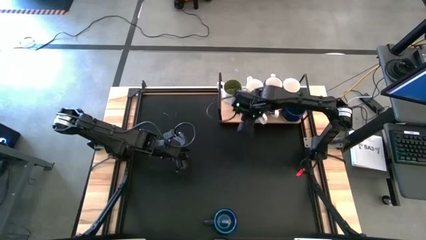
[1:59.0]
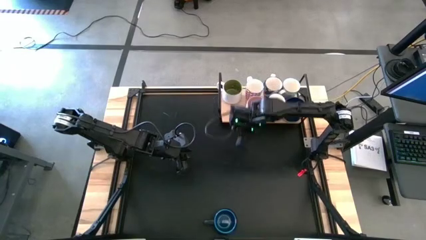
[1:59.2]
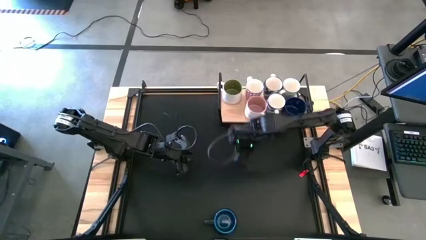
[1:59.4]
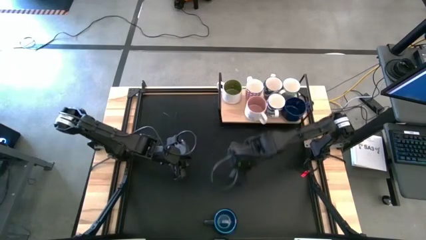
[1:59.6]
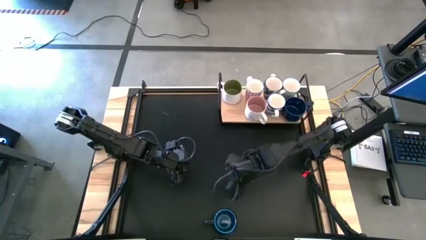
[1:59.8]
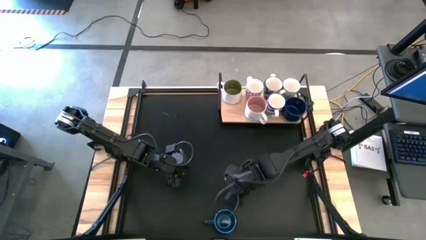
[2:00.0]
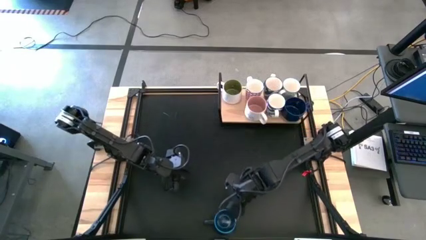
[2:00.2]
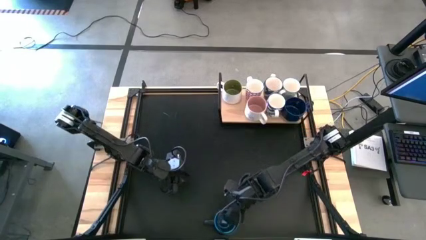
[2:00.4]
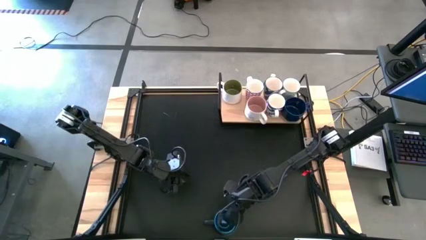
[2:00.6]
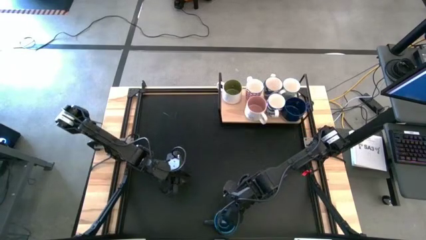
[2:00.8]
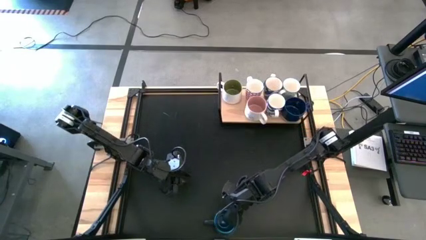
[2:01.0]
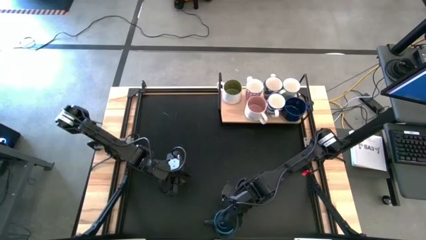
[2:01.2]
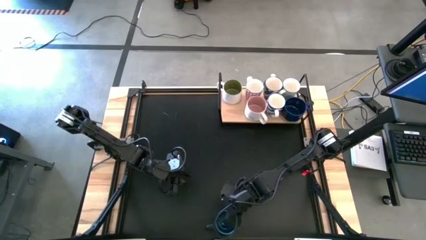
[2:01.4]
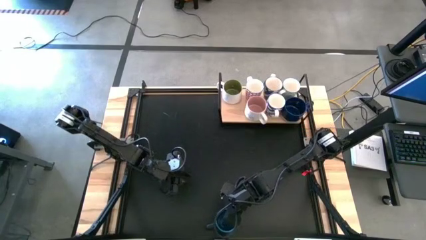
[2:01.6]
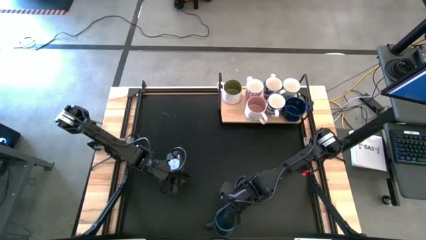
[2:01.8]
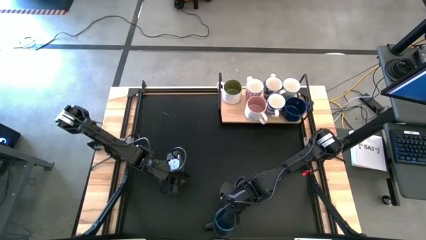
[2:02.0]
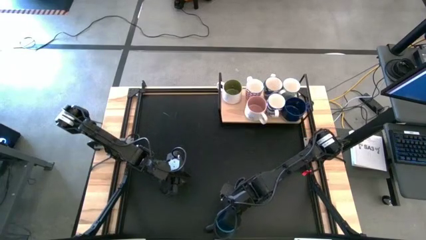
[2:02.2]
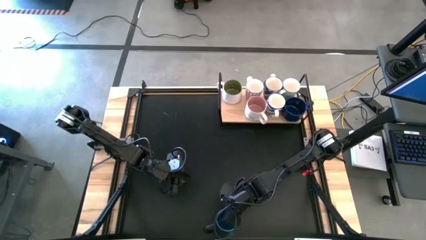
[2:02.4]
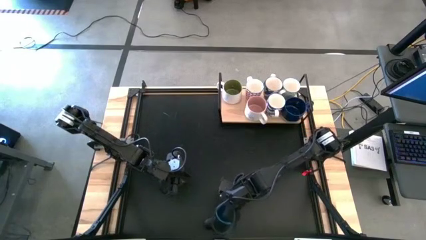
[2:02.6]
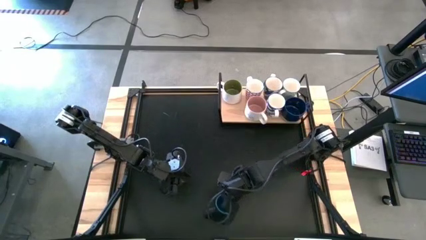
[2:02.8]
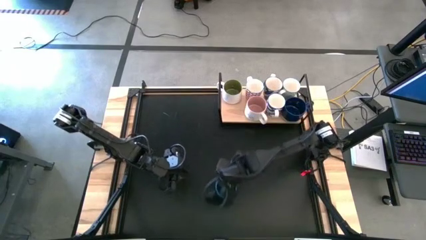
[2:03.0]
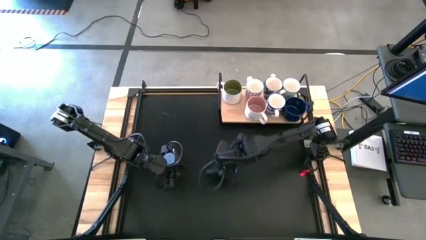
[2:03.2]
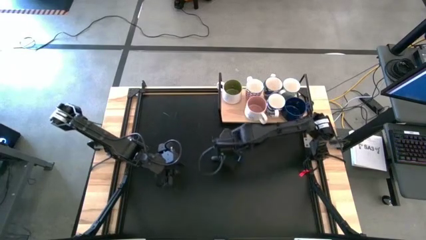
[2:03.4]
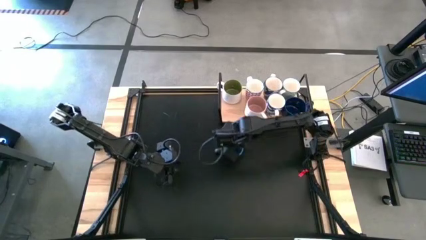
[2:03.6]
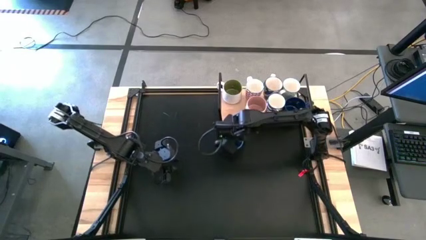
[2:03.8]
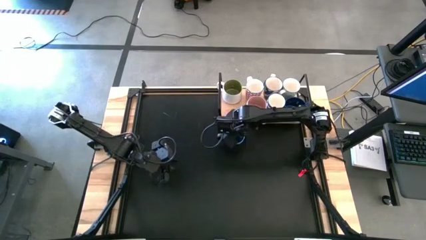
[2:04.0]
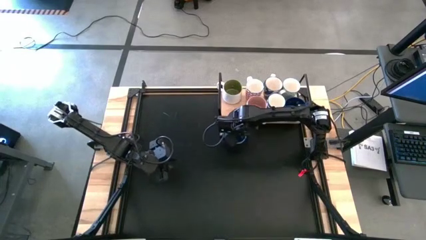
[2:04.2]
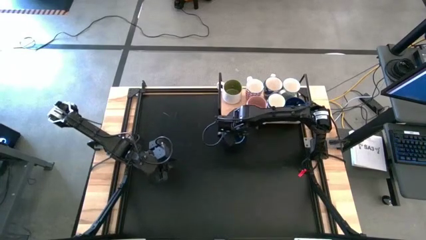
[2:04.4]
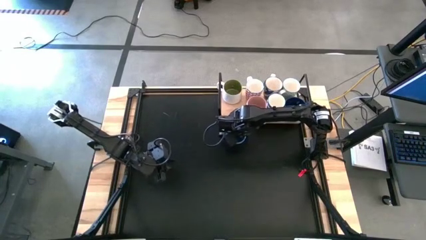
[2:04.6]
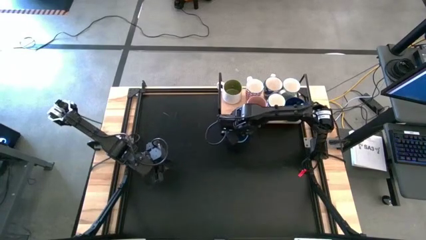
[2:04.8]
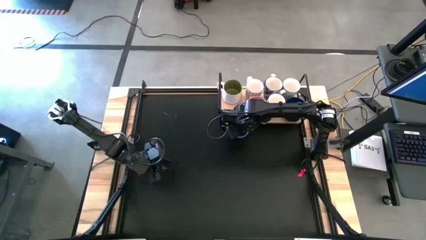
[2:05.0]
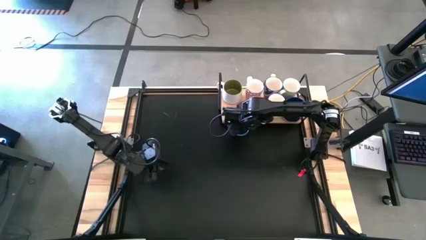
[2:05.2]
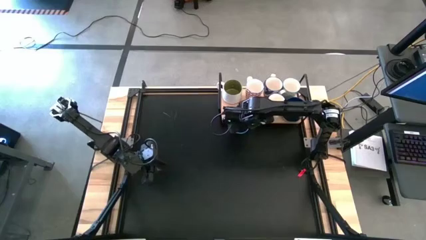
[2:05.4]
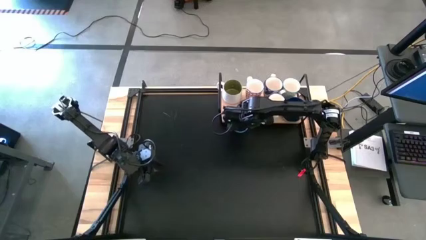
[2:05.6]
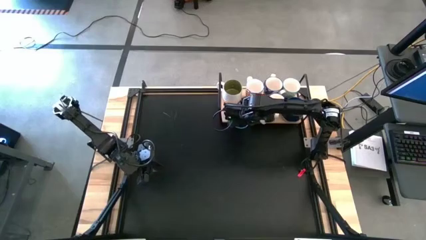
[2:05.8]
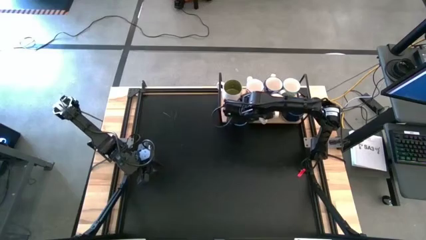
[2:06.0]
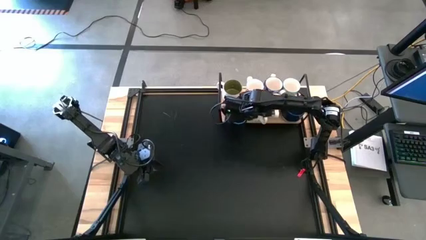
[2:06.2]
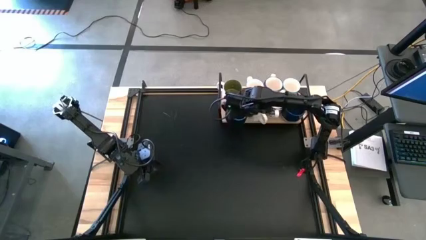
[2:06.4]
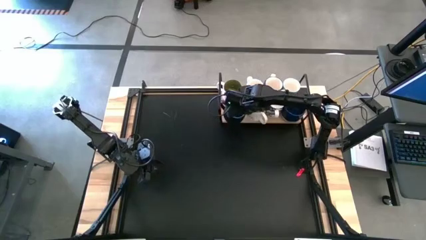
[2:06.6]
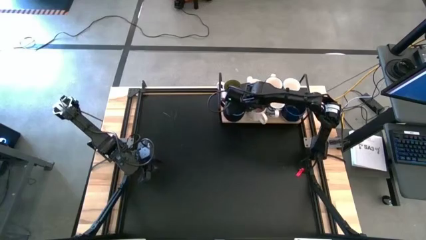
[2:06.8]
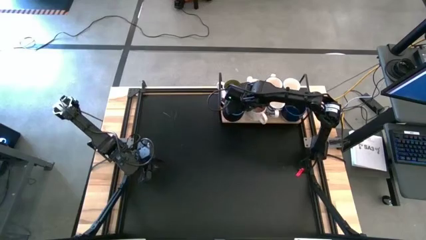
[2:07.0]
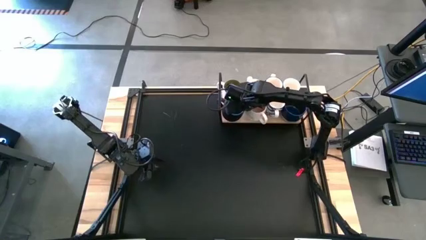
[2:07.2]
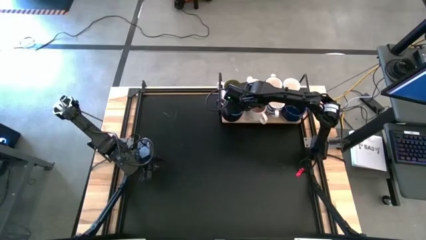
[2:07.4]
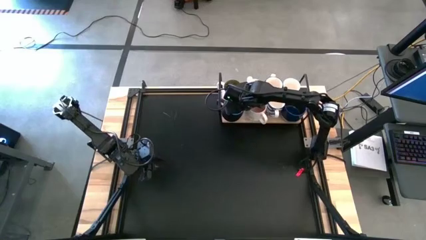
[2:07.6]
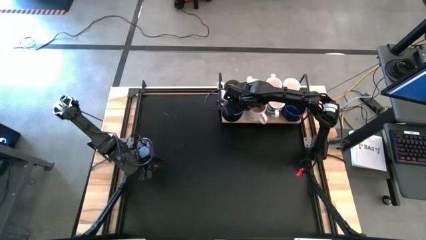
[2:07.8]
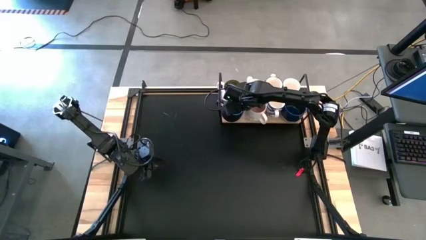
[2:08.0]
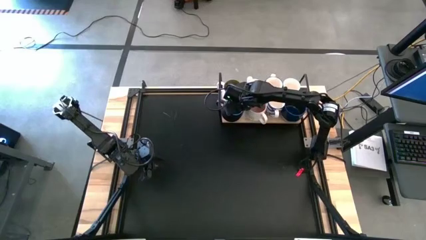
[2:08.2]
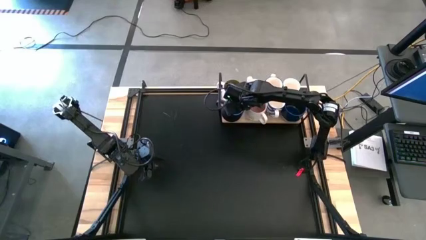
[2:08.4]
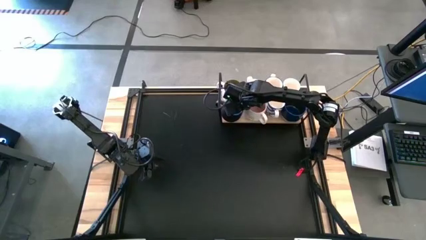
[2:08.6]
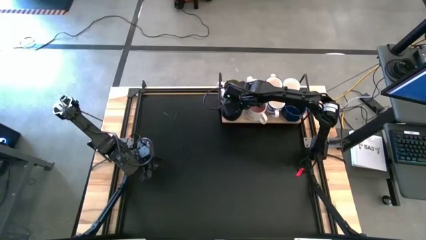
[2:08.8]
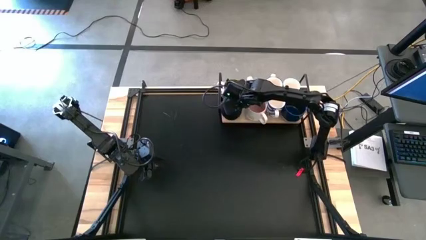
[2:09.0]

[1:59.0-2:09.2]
Task: Place coffee mugs
Put the black mug on the shelf

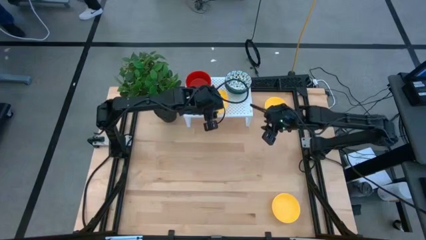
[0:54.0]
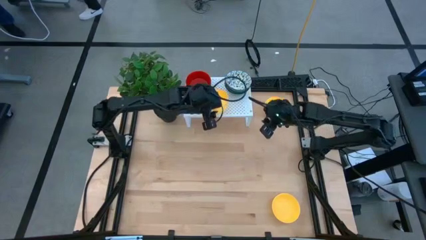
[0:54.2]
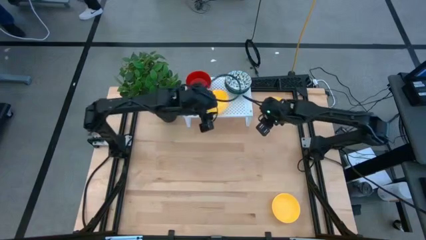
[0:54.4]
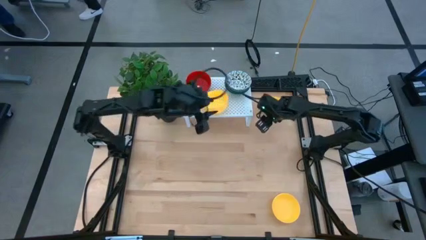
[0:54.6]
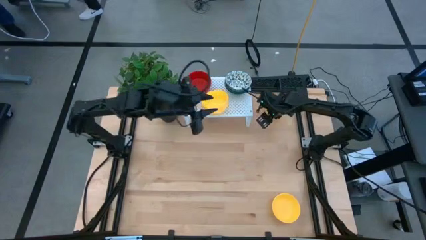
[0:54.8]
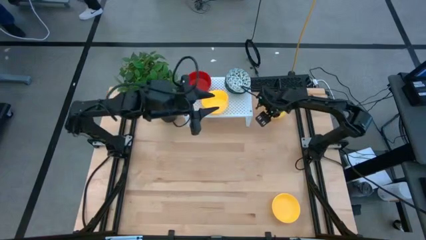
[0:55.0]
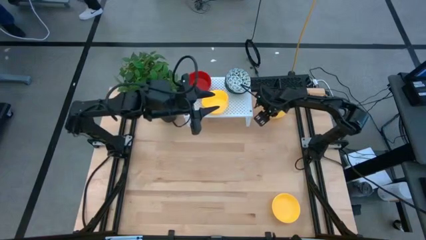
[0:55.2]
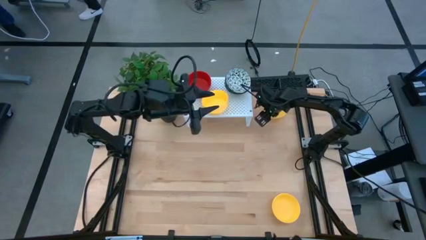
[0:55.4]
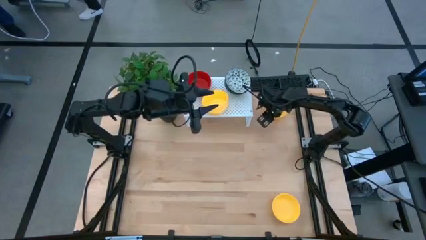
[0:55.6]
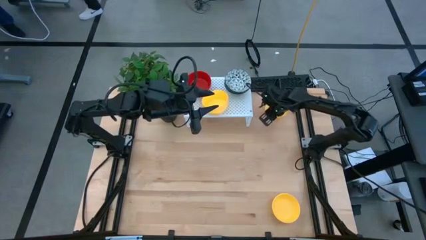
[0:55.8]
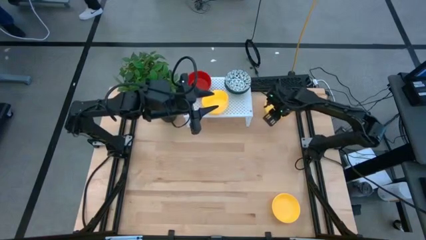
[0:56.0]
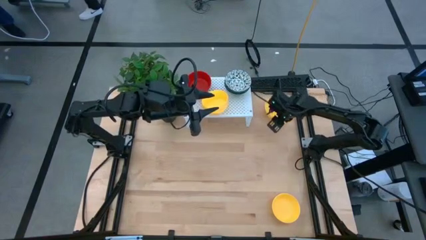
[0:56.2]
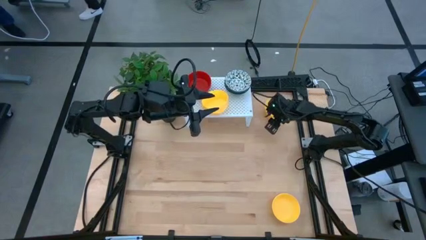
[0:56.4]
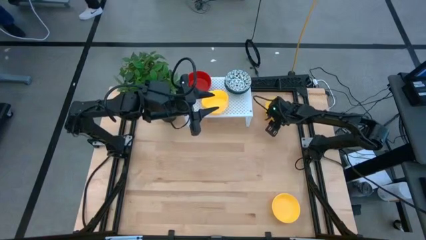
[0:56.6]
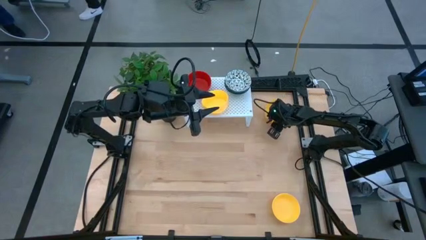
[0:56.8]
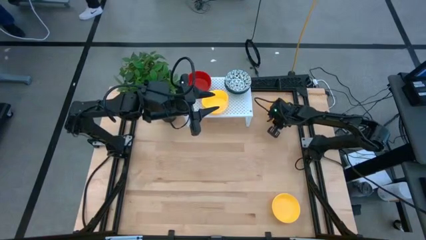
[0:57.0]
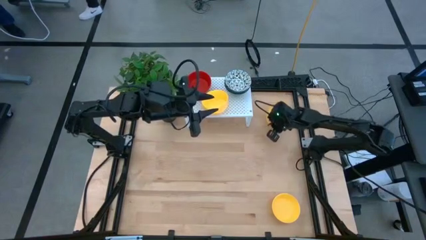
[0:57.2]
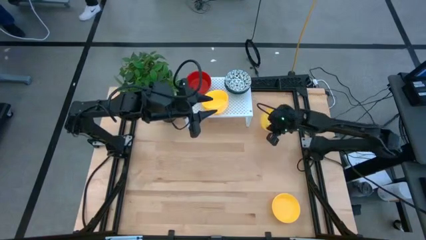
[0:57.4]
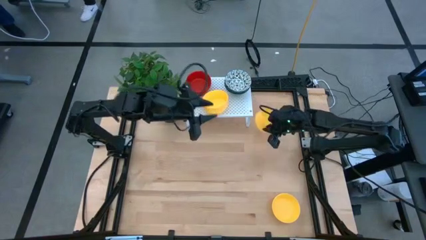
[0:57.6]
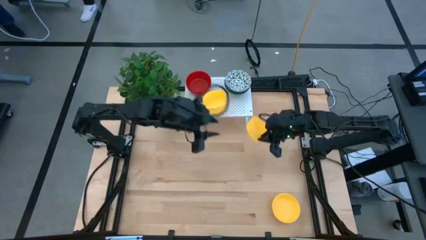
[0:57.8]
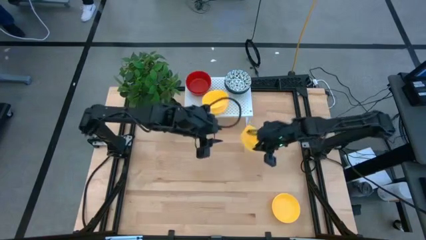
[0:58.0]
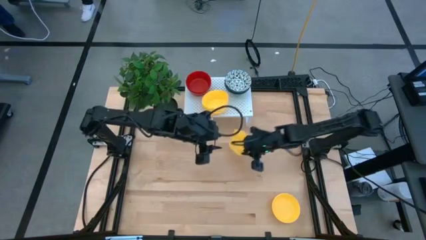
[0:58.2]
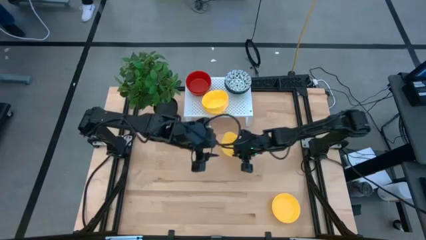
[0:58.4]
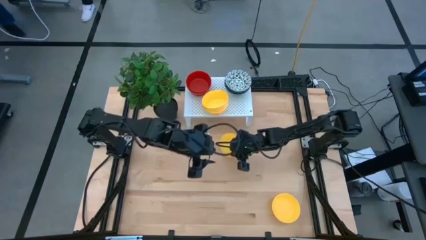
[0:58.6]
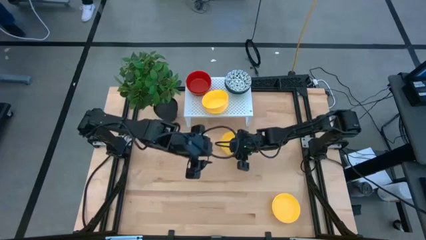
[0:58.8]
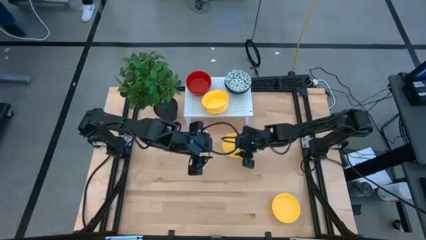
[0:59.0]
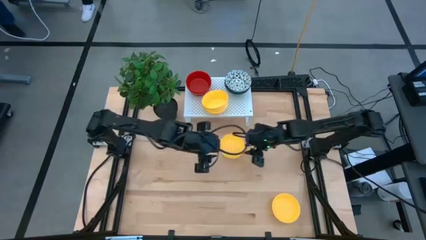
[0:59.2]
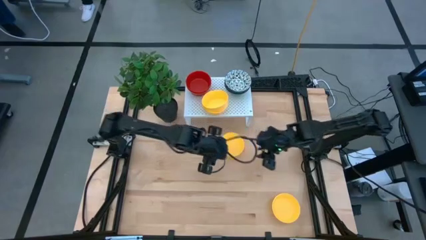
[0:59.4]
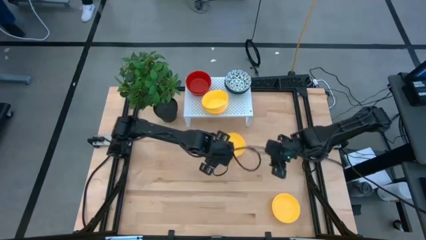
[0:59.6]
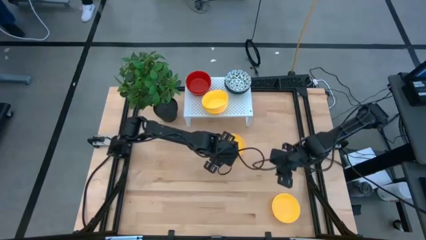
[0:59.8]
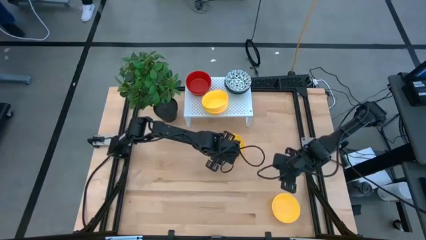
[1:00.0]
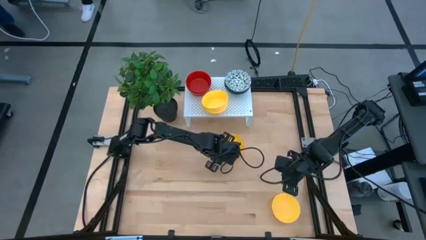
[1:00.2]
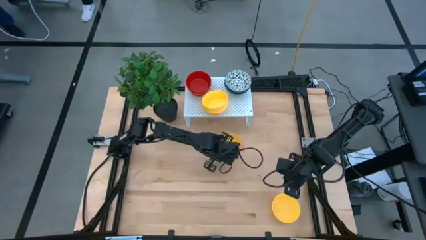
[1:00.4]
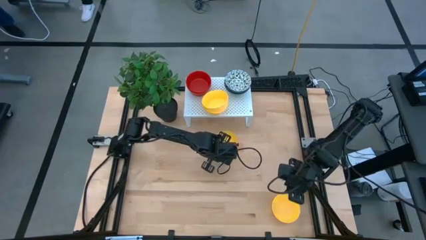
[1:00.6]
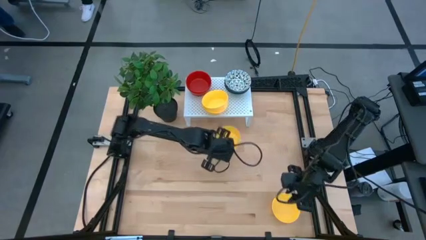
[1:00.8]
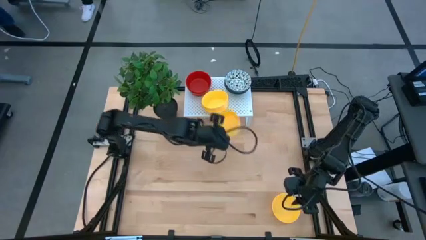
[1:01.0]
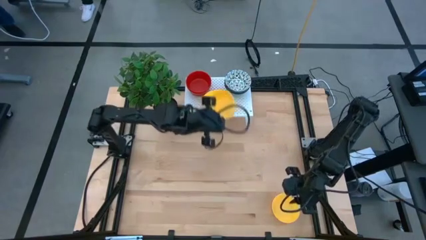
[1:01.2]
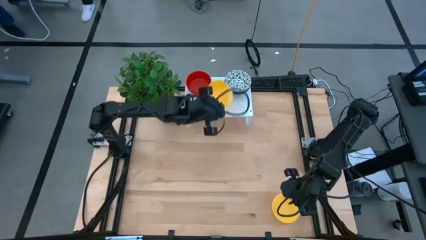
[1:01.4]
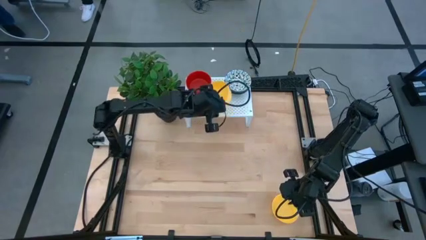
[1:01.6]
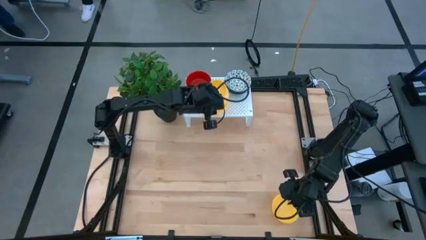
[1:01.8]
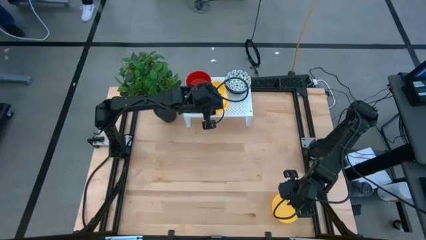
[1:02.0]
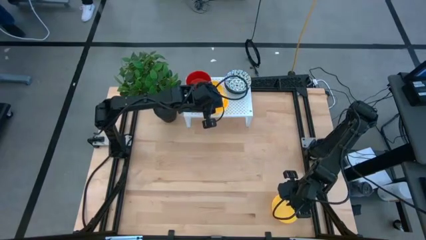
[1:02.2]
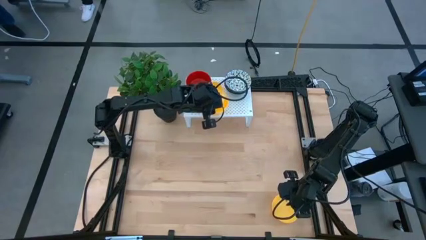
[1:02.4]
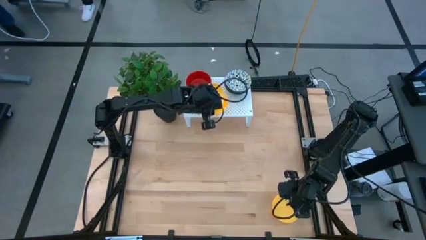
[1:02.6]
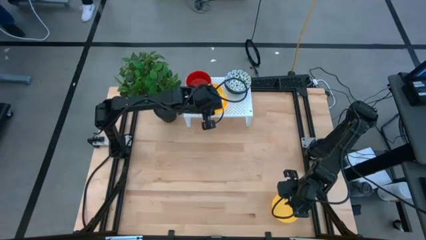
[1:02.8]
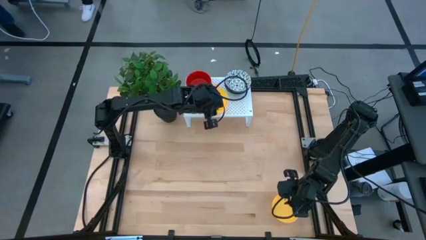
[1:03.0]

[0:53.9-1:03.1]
Task: Pick & Place Mini bowls
Stack the yellow bowl on the yellow bowl on the shelf
